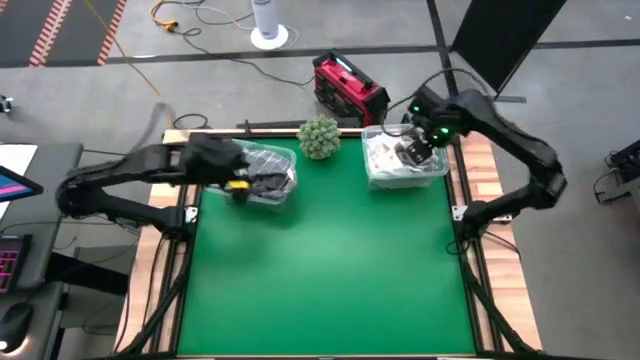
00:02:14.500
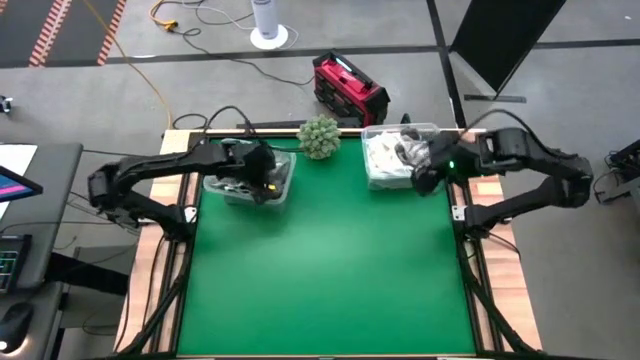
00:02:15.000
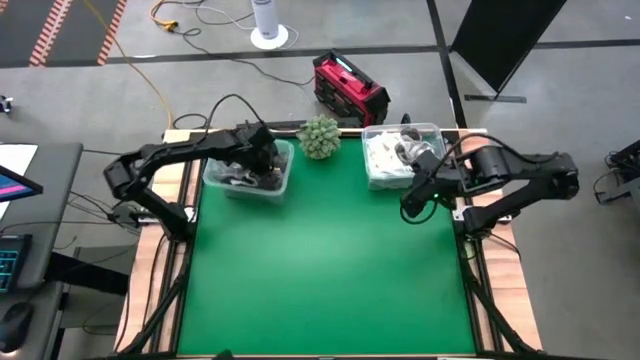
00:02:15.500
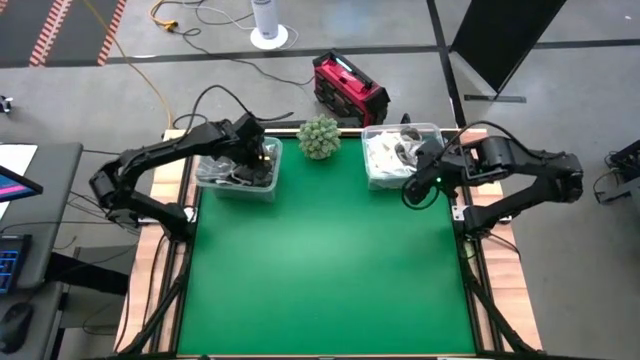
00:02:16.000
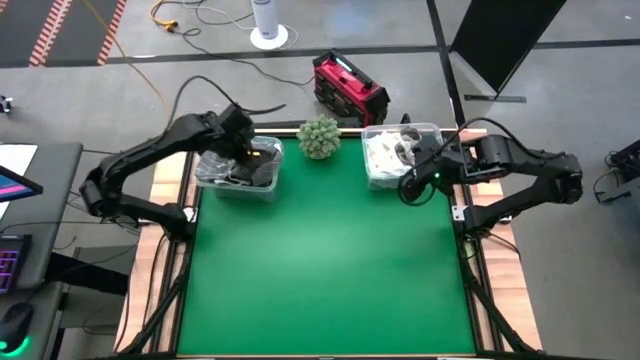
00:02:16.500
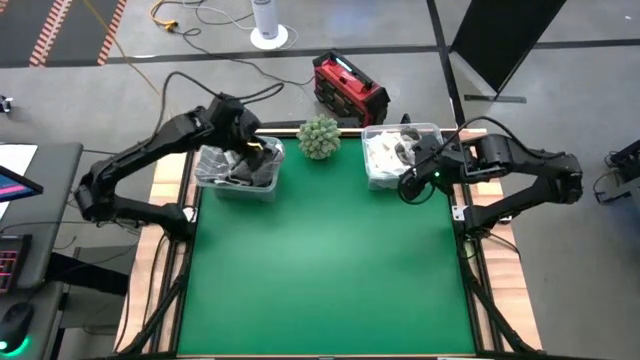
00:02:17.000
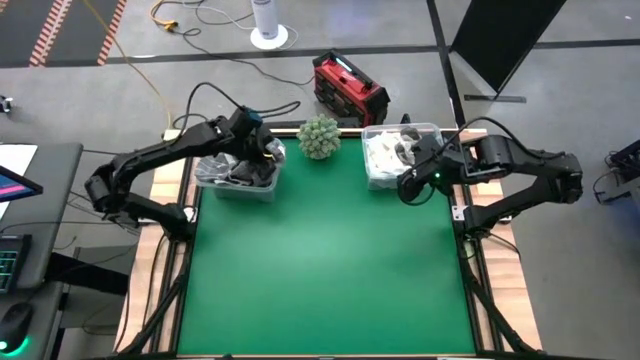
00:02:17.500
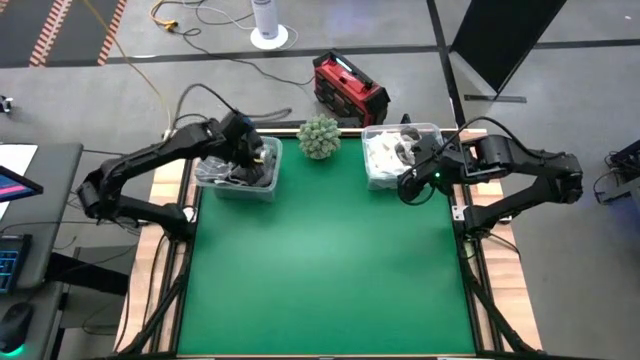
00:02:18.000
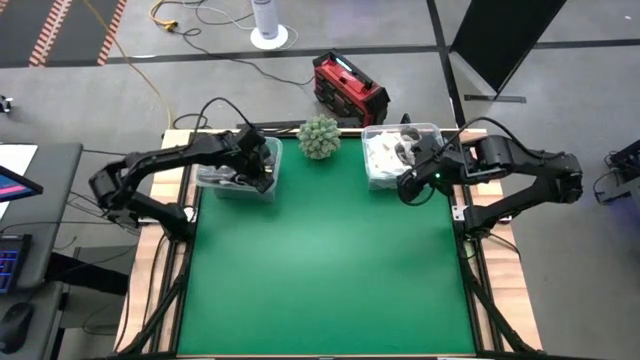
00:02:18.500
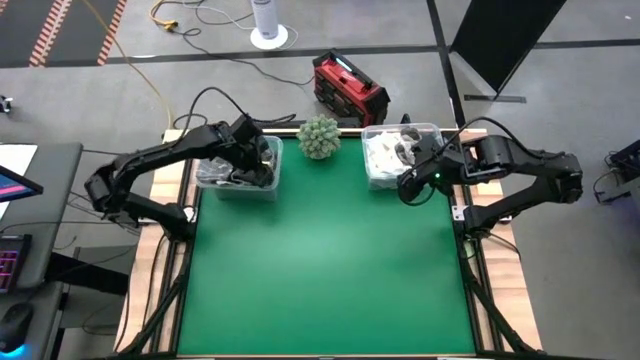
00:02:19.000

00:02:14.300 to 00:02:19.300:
Task: Sort towels by color in basket
Adjust the black towel

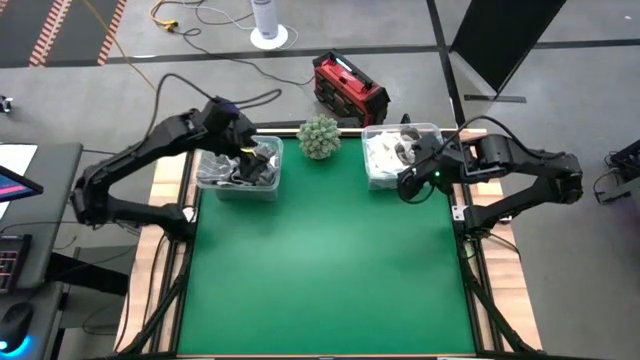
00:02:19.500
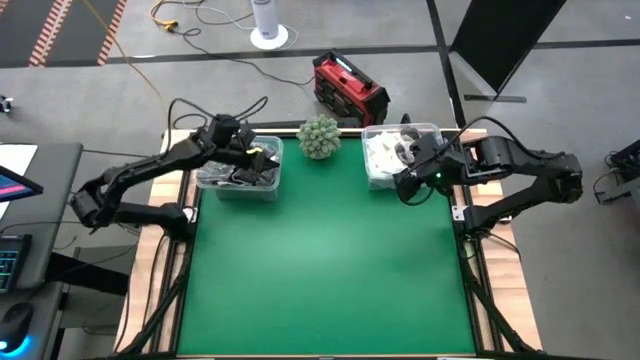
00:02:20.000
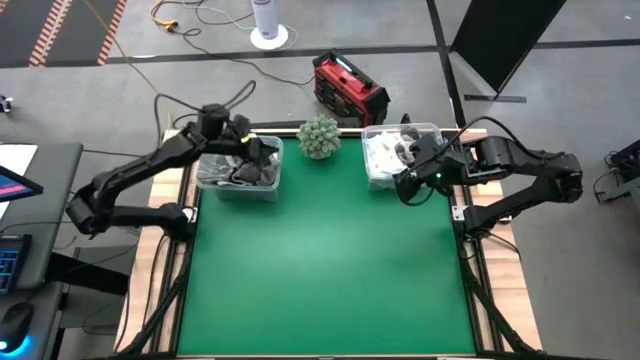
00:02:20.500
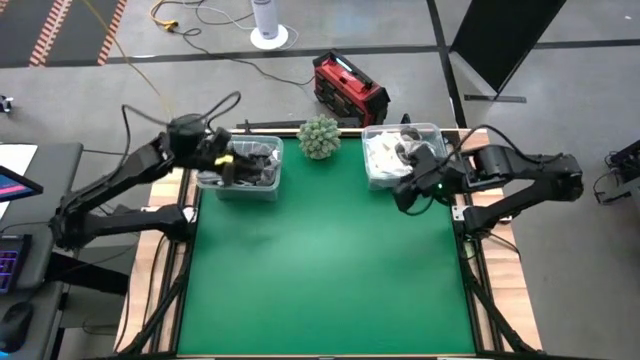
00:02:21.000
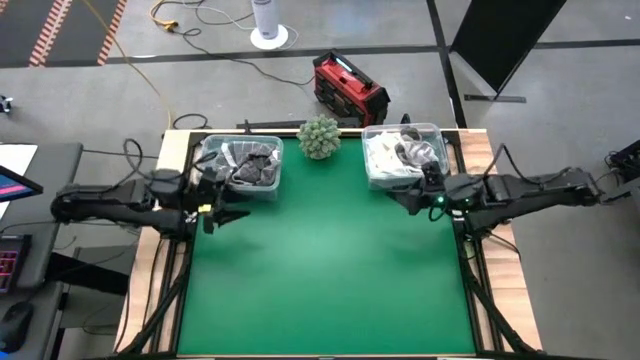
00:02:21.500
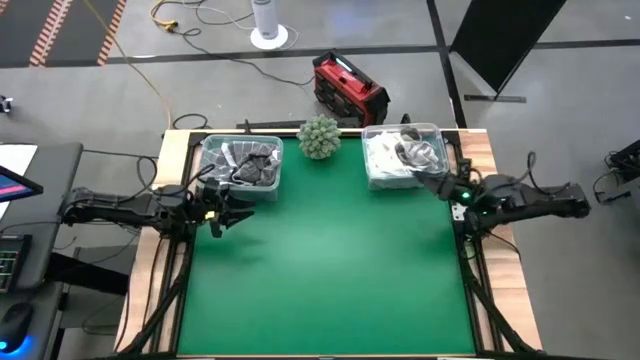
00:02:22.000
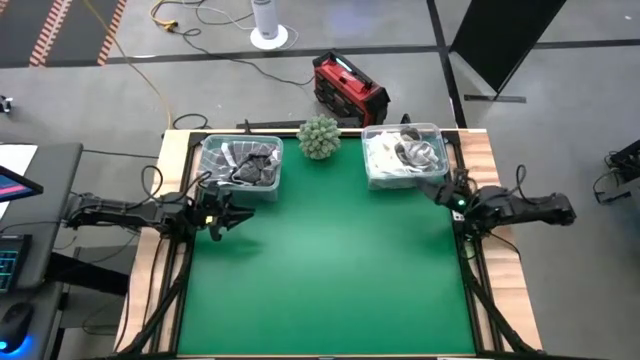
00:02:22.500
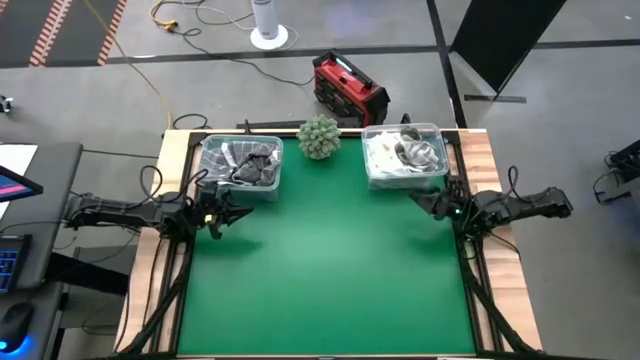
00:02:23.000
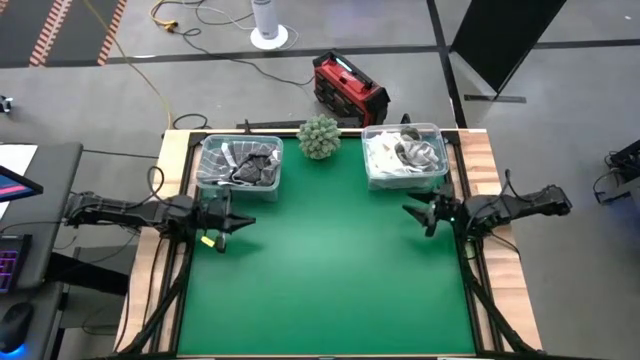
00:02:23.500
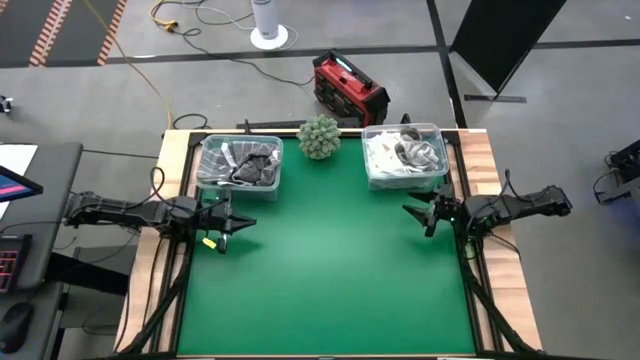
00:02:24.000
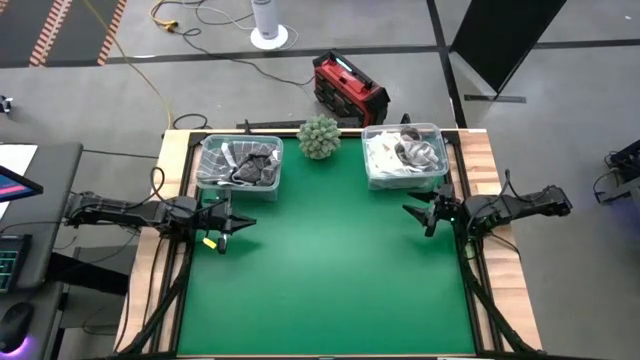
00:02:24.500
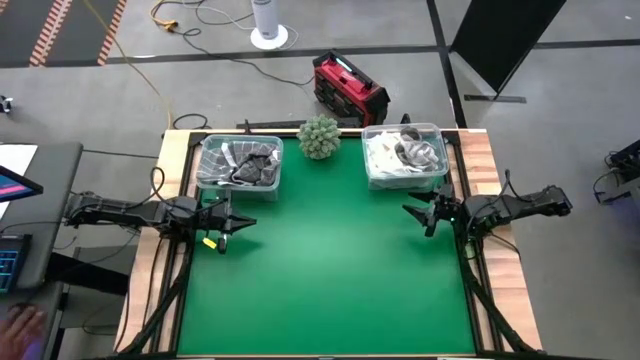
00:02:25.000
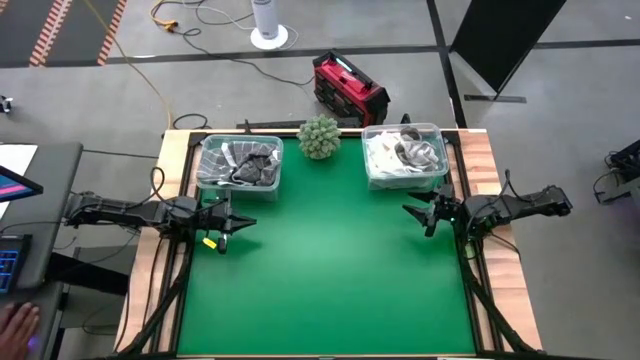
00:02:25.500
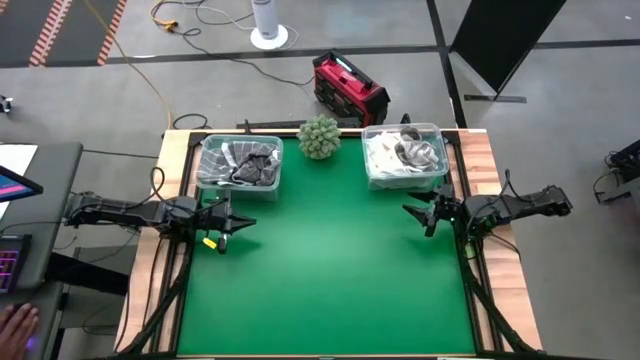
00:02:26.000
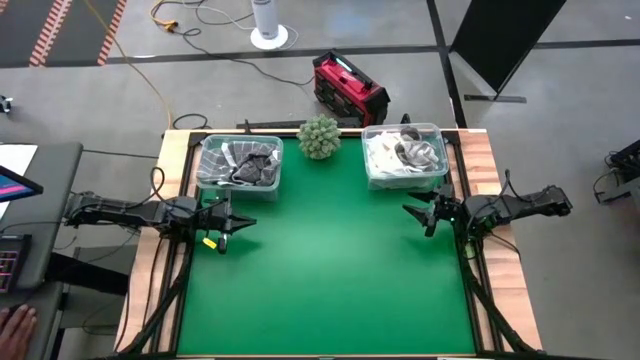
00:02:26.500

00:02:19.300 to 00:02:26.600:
Return to Home Position

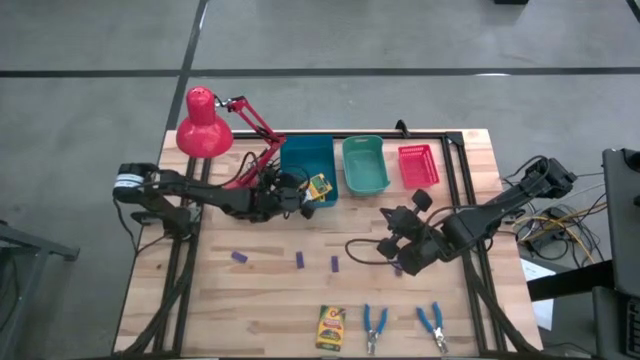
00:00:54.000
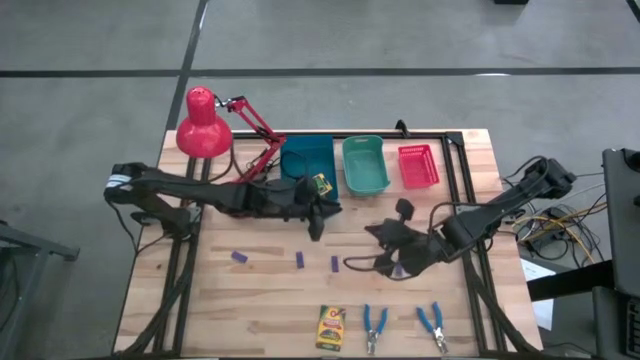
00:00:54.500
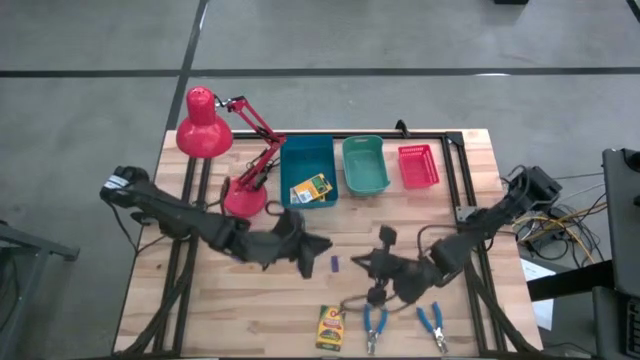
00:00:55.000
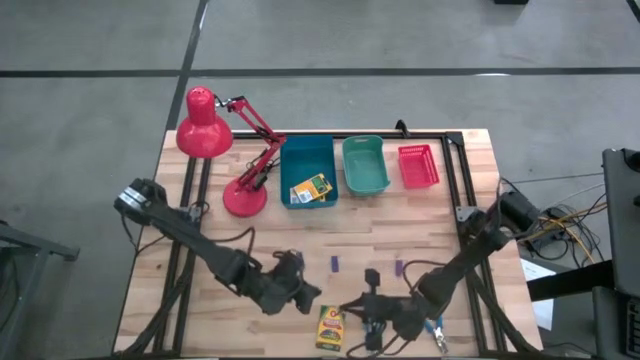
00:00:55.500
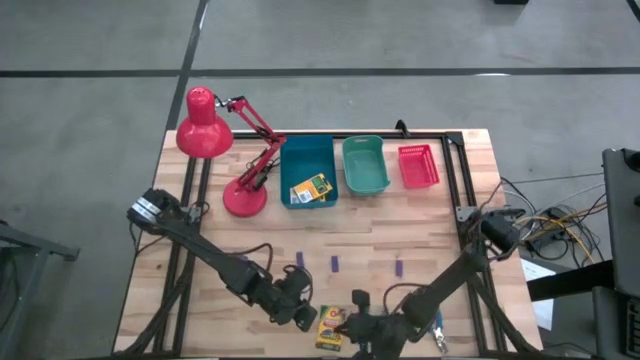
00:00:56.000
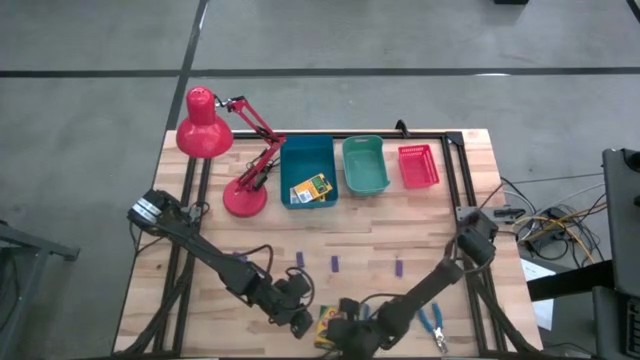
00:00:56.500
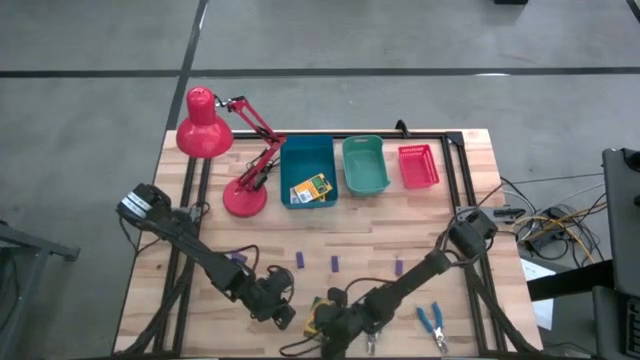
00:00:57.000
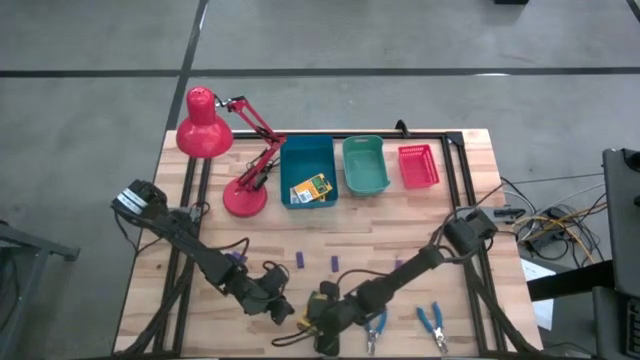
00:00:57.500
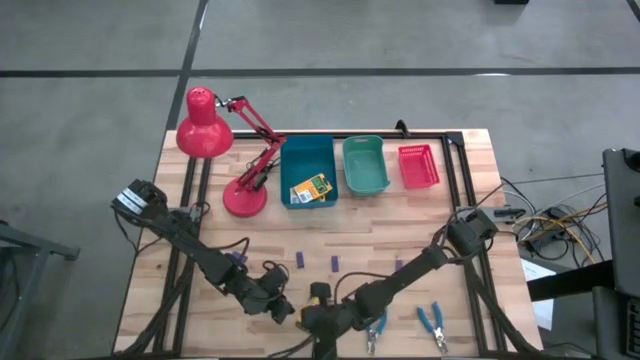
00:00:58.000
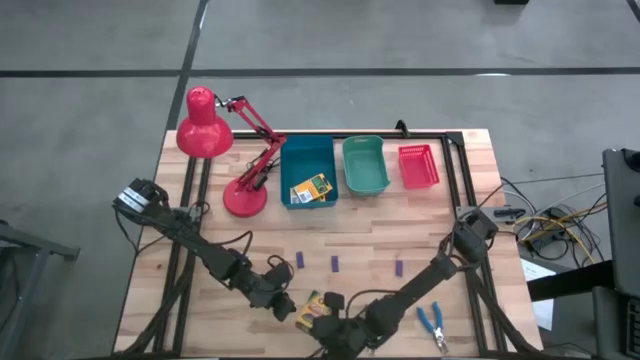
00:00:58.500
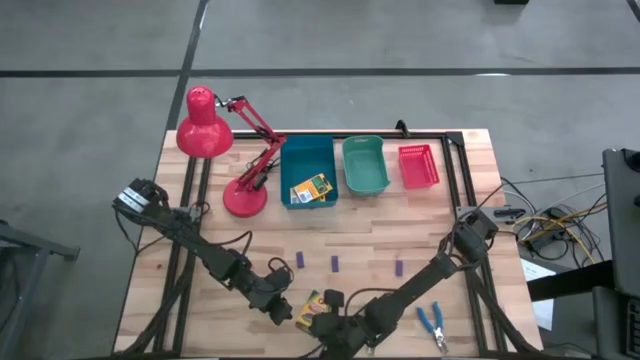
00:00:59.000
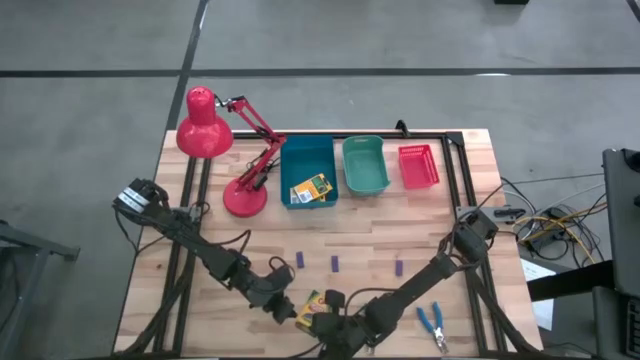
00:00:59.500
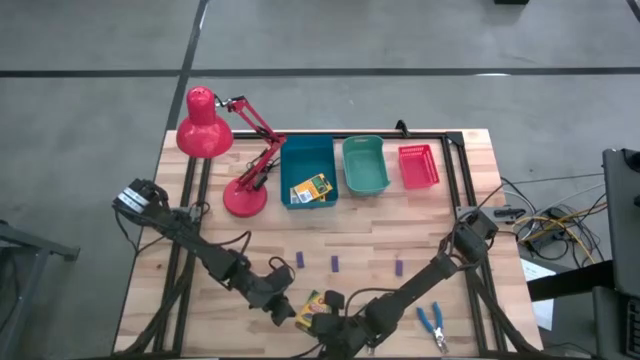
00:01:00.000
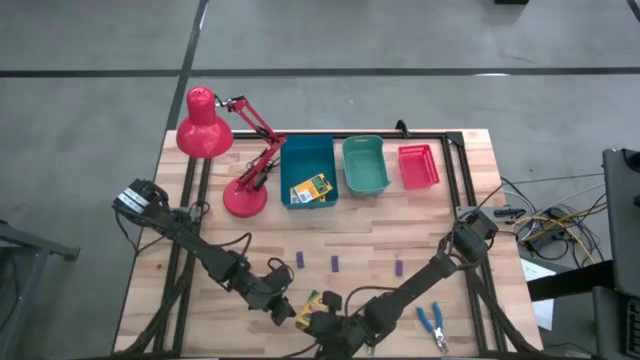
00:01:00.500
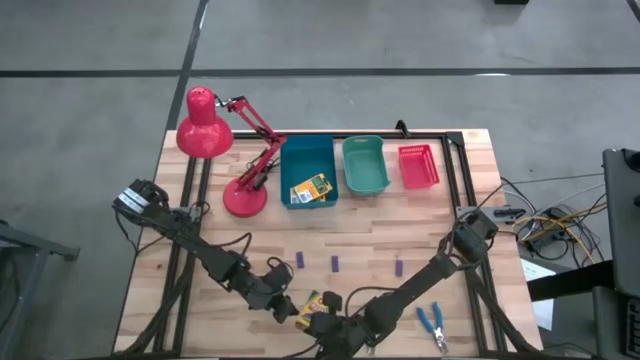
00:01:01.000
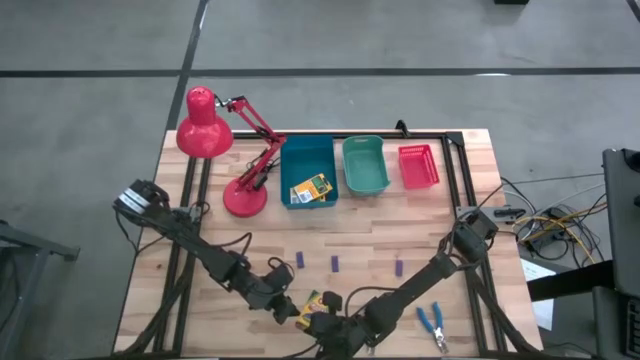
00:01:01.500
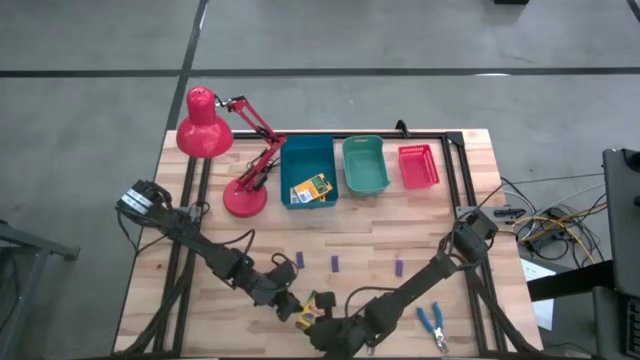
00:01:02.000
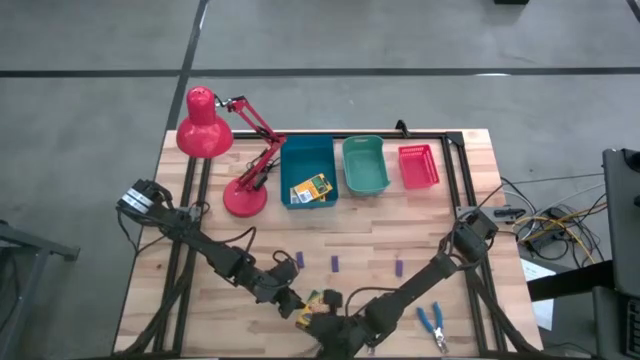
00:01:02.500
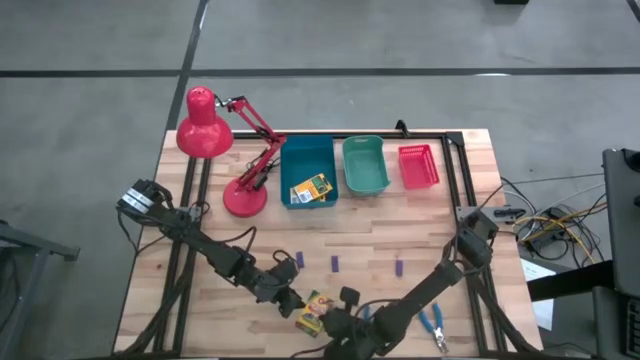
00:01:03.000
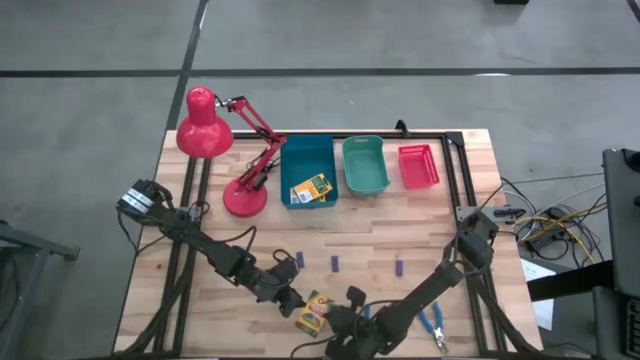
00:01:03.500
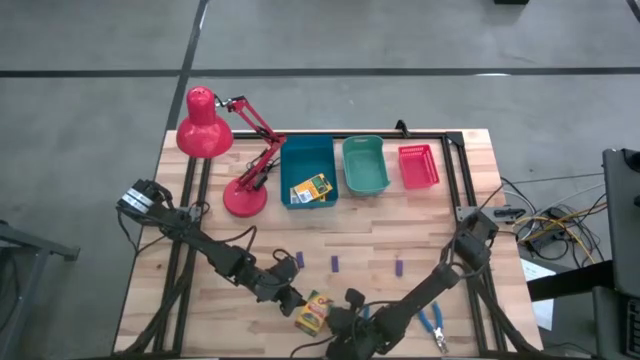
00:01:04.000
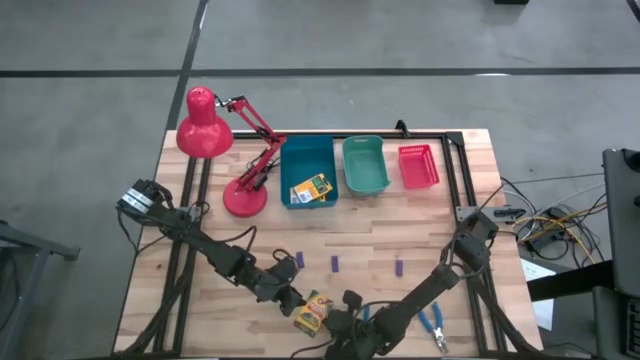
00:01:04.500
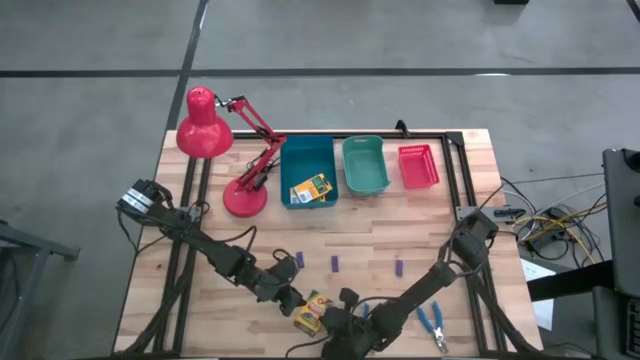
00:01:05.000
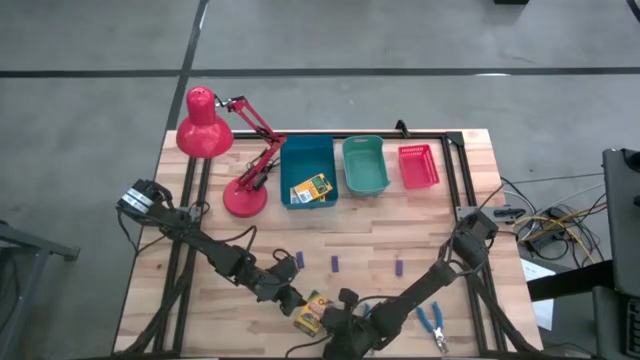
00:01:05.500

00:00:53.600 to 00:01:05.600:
Task: Pick & Place School Supplies
Put the crayon box into the blue bin
